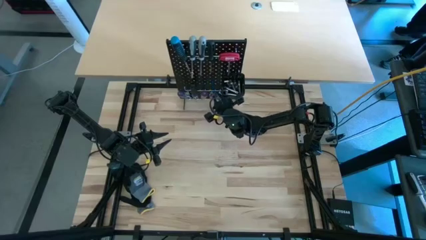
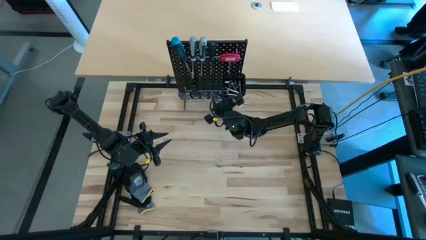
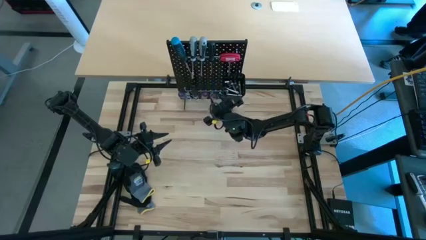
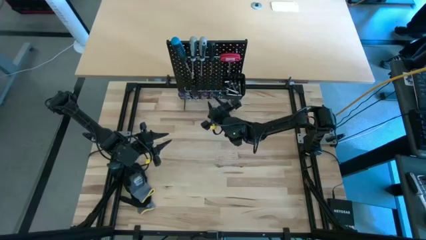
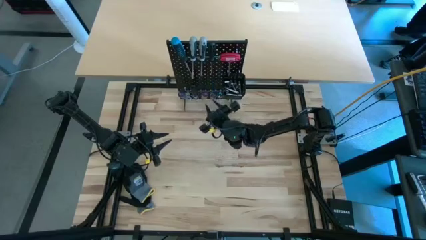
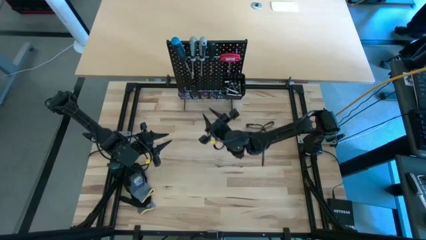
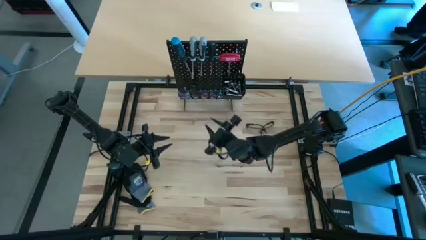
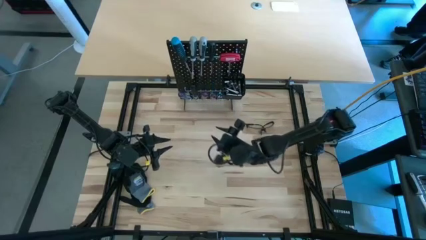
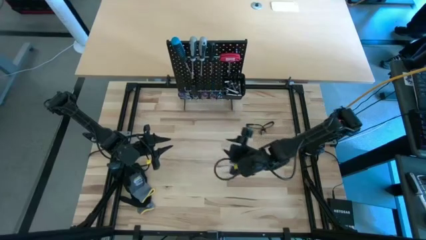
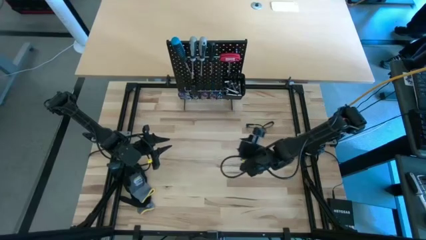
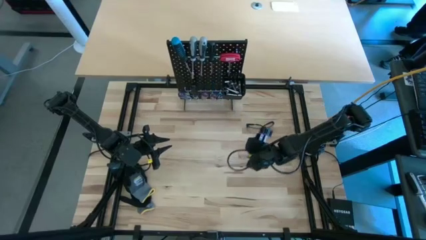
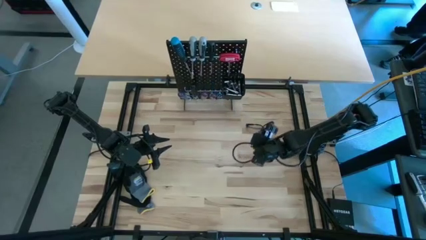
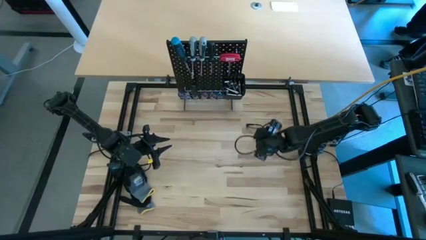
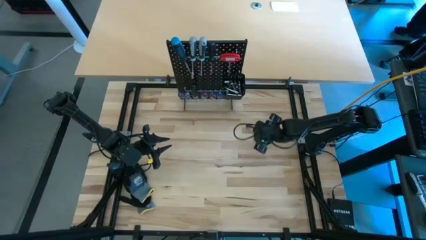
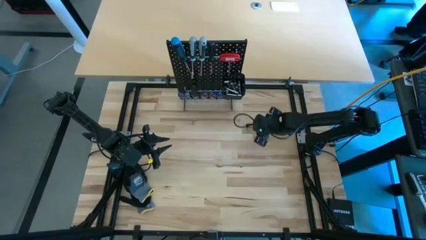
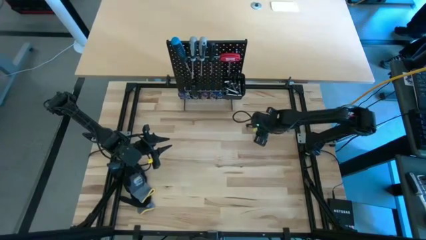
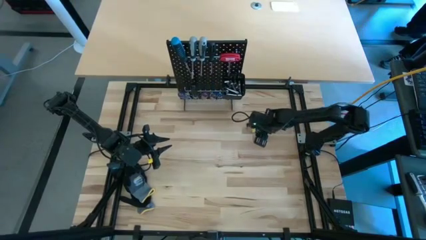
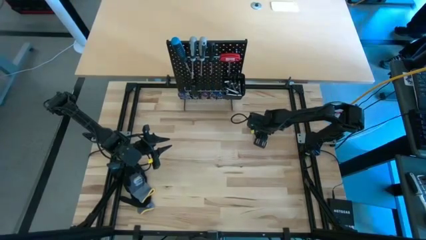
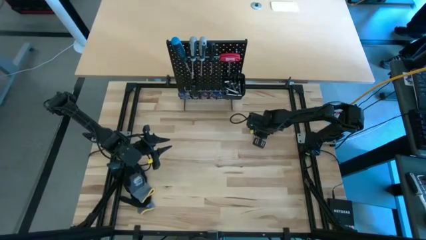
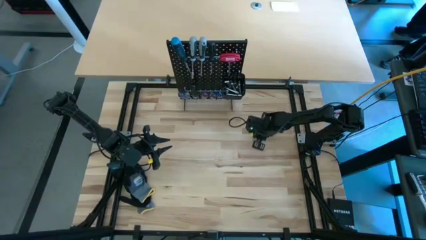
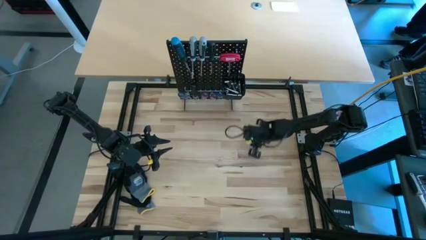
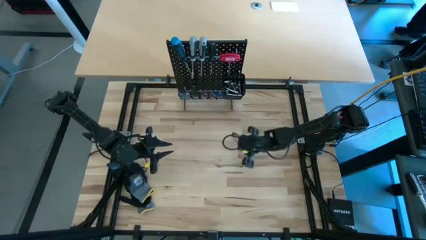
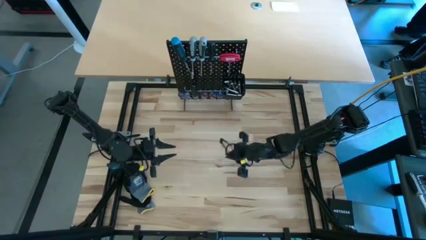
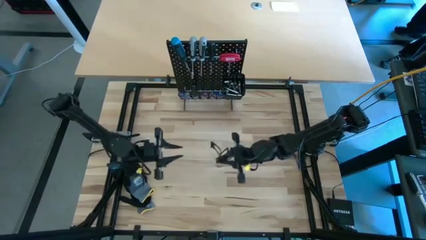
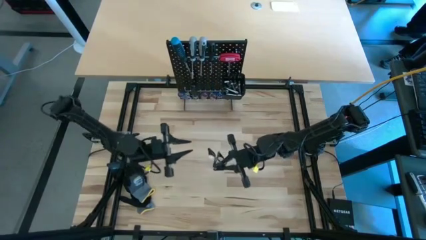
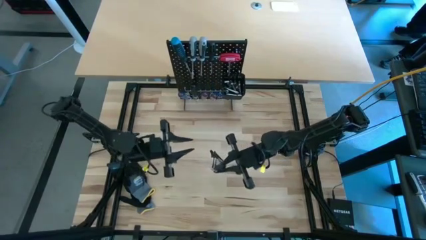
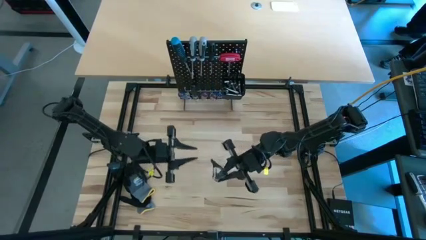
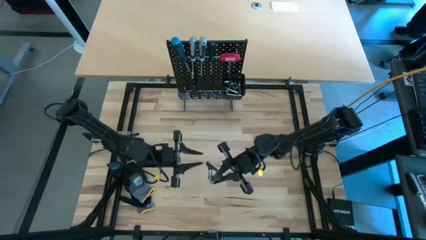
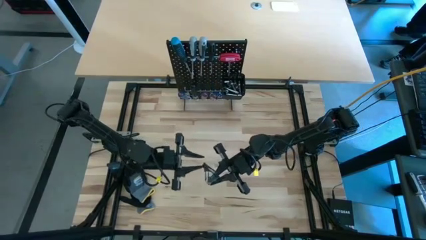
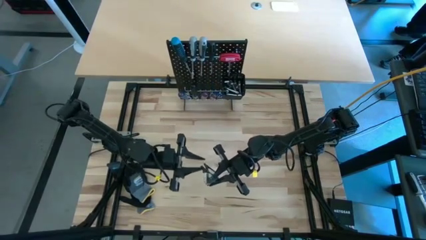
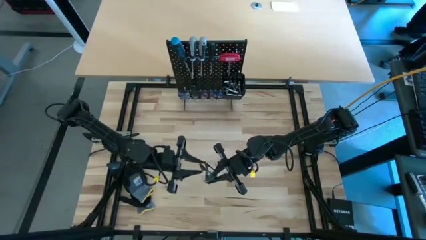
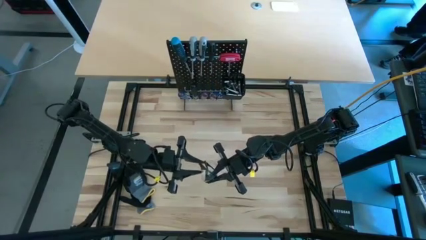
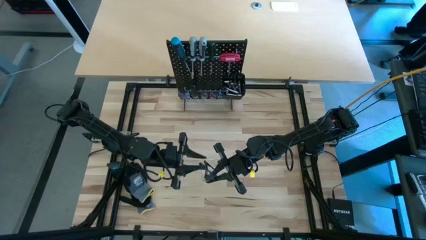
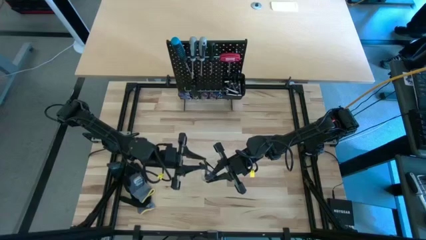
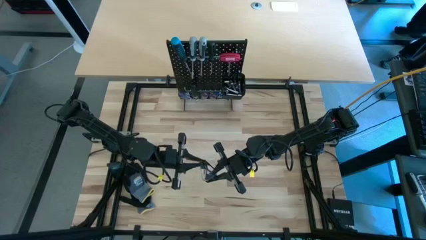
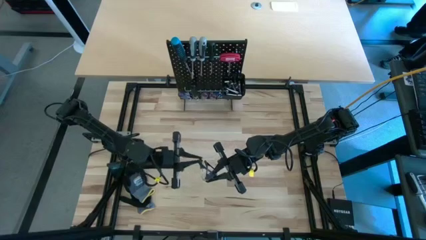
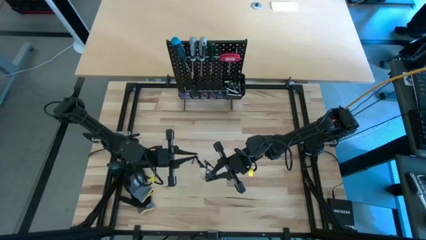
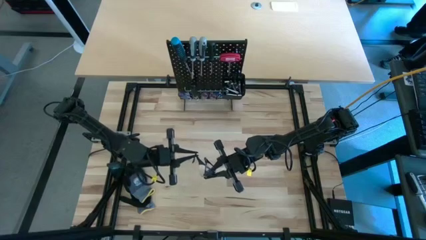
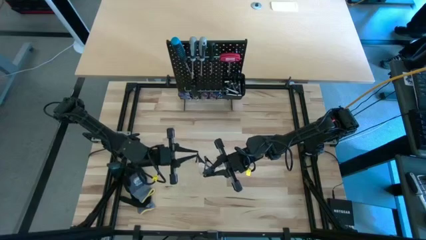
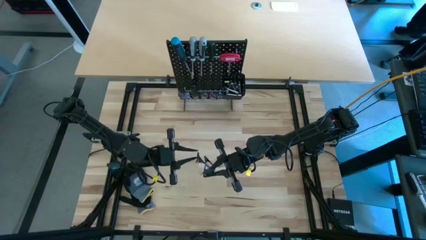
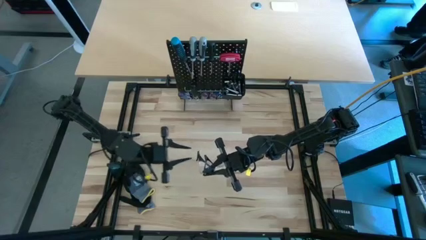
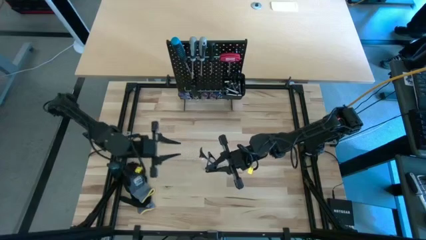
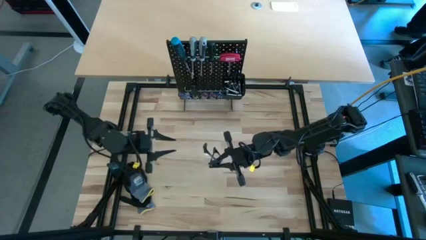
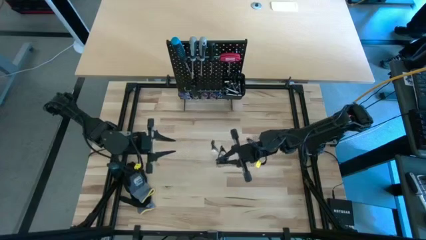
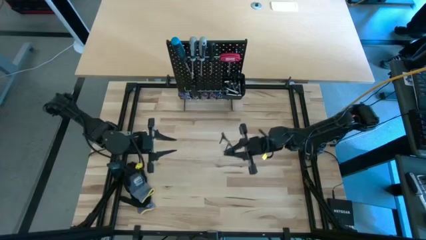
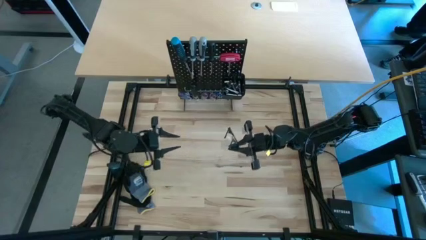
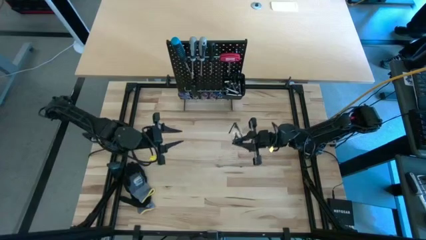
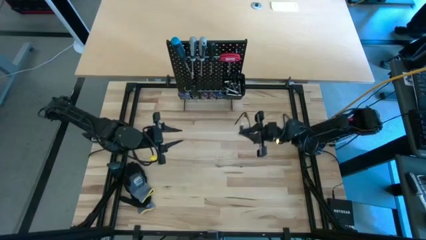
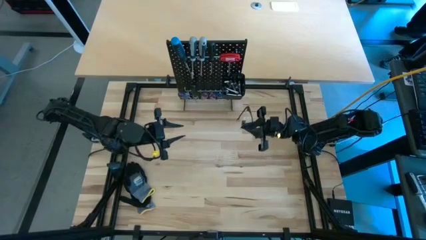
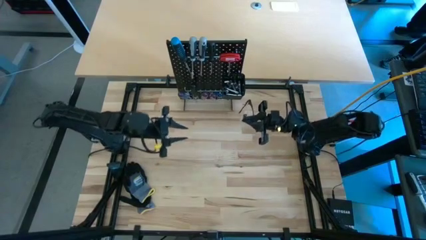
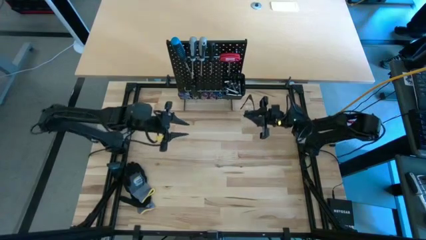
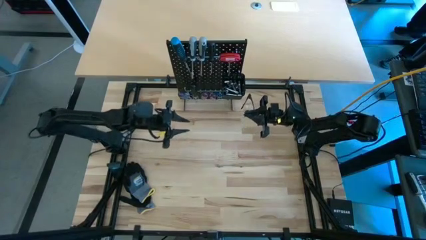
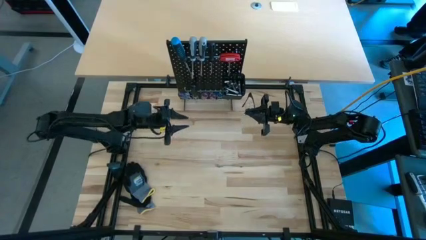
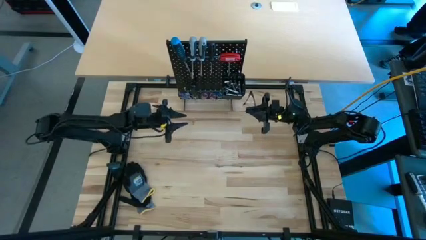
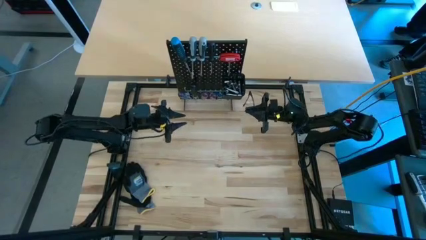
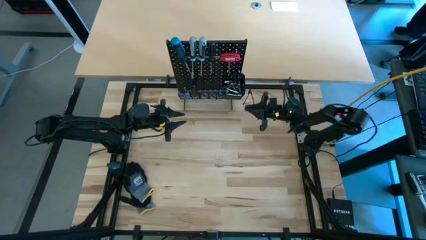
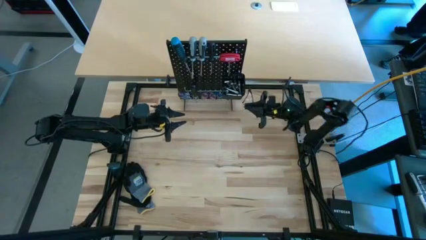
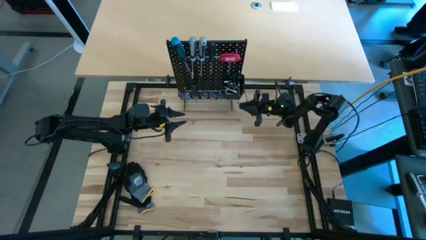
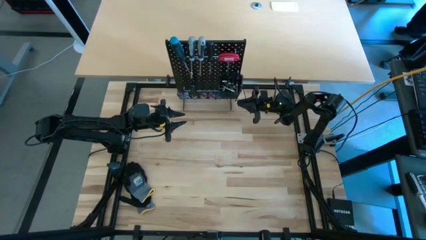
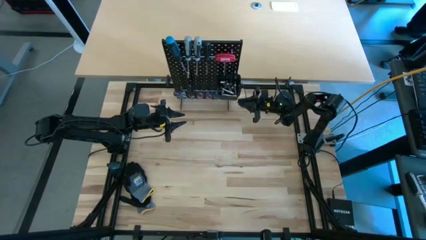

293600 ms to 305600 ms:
Task: Hang tools onto peg board
Hang the black safety goggles on the peg board

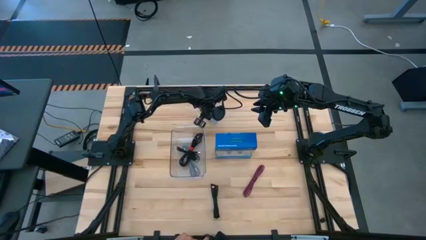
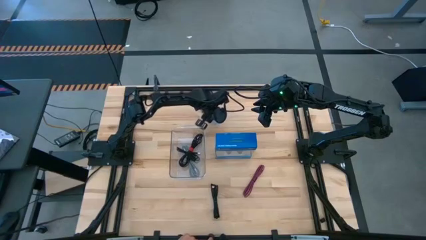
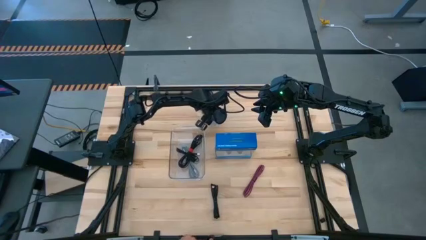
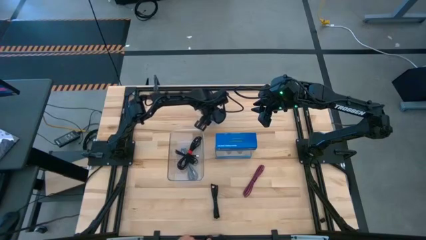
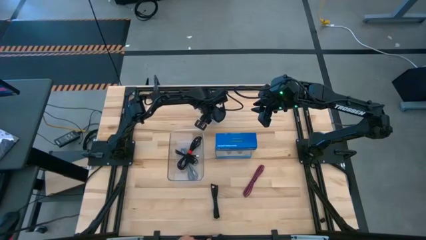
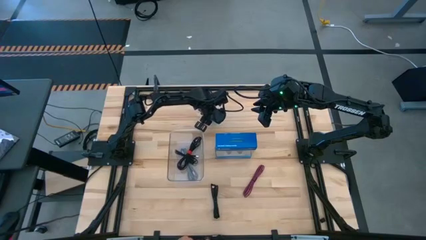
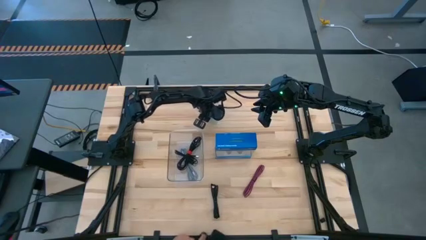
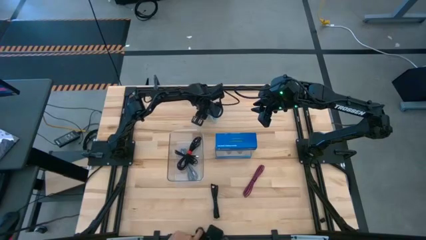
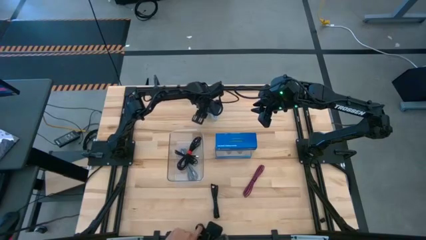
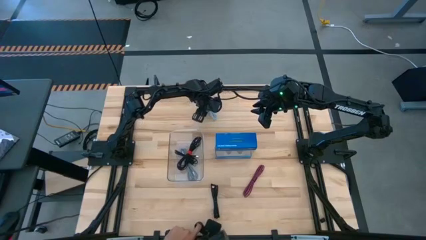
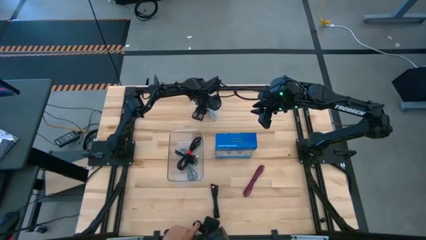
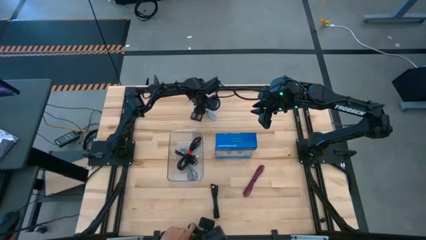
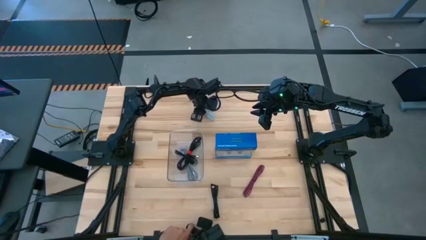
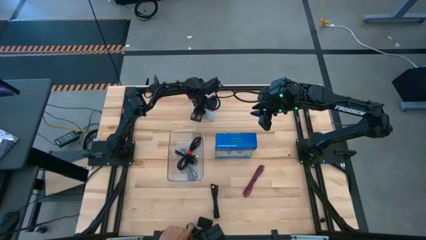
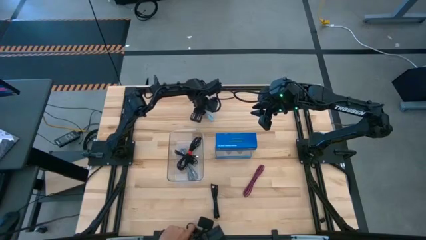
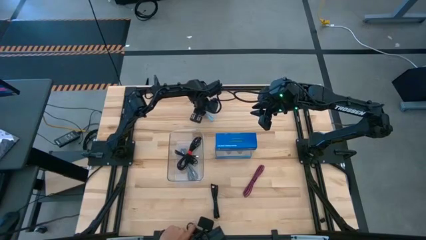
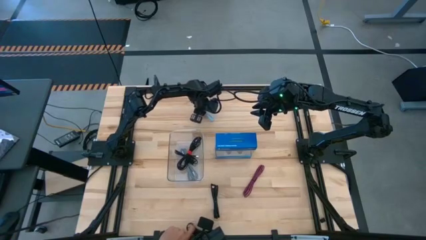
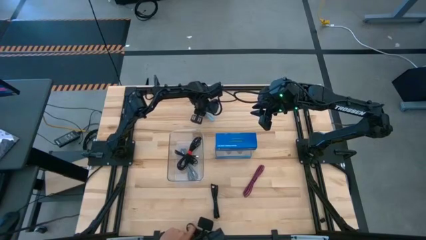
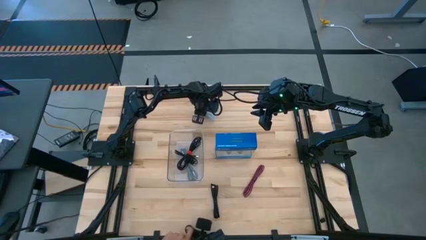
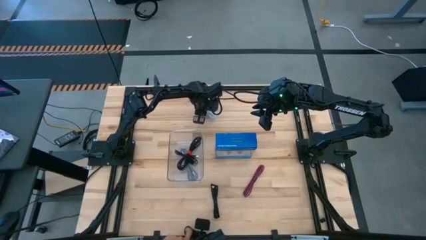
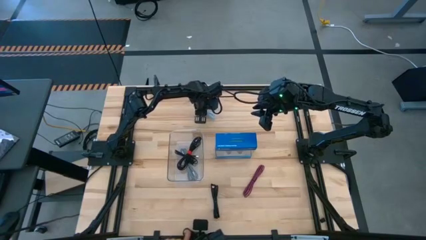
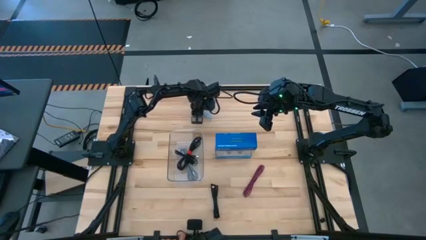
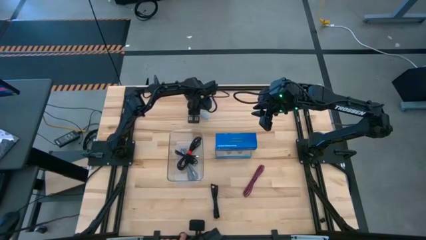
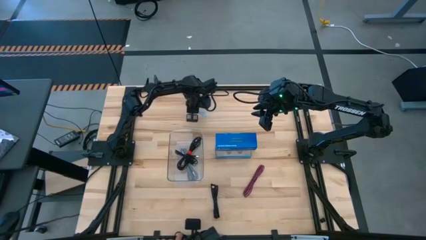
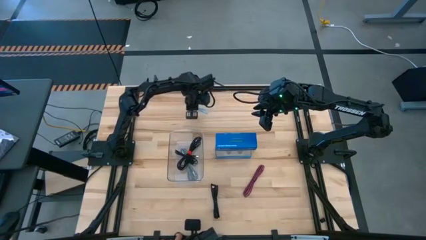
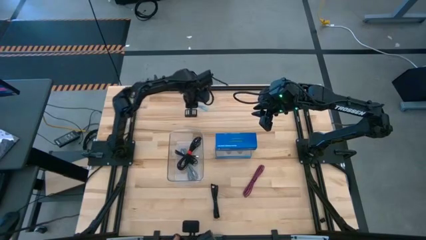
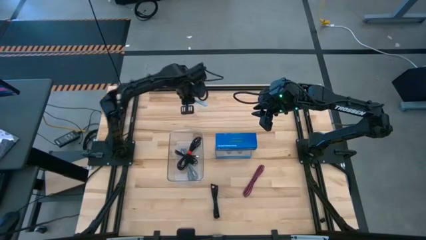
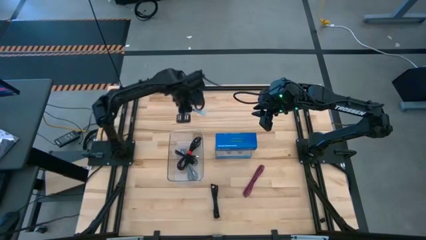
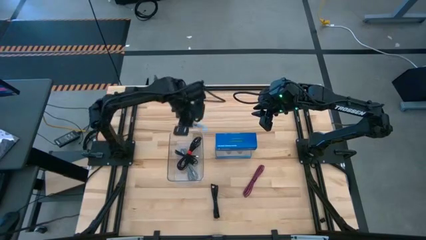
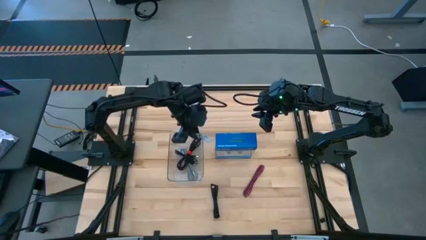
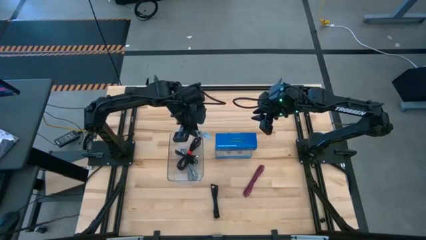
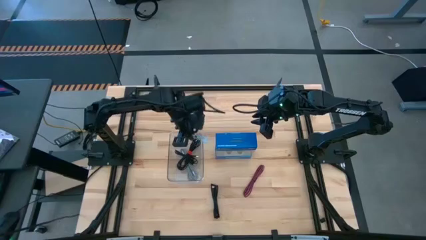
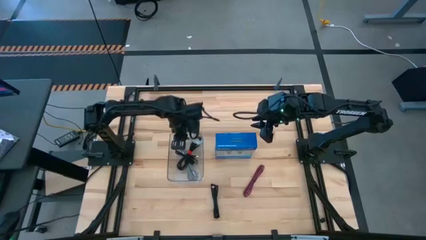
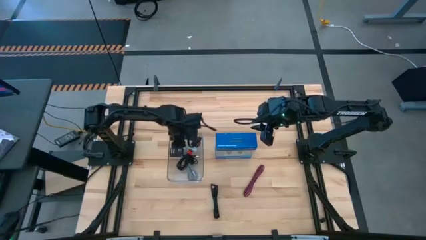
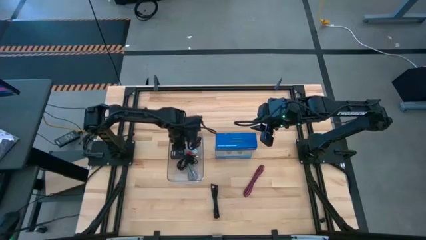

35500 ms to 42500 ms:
Task: Pick and place USB-C Cables
Put the light blue charger cable into the transparent bin
